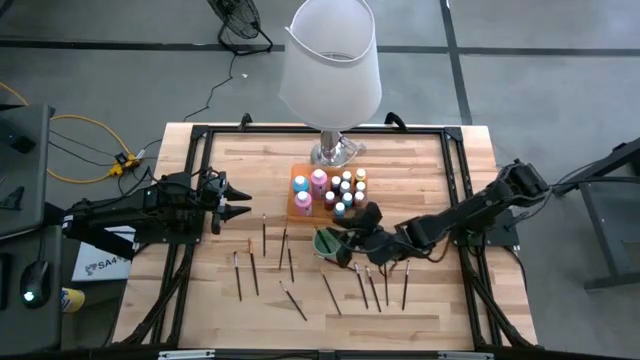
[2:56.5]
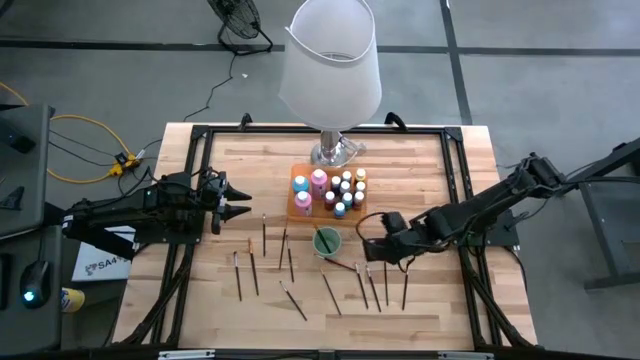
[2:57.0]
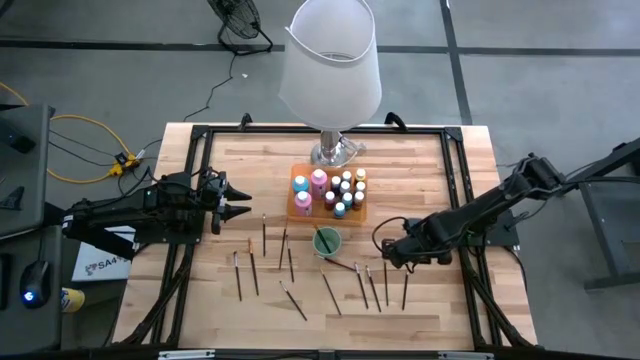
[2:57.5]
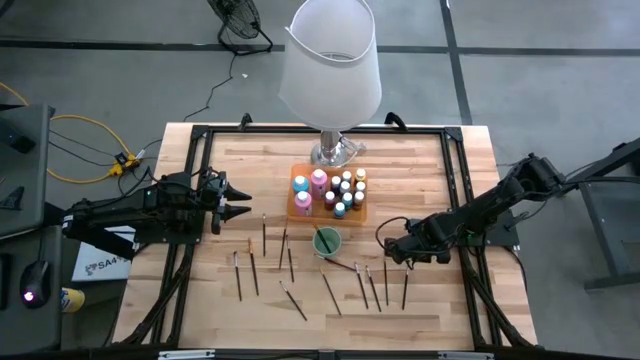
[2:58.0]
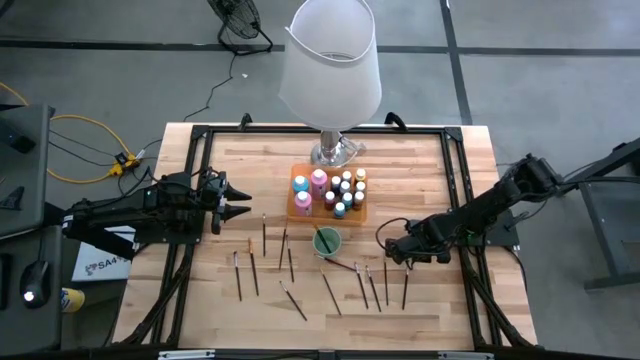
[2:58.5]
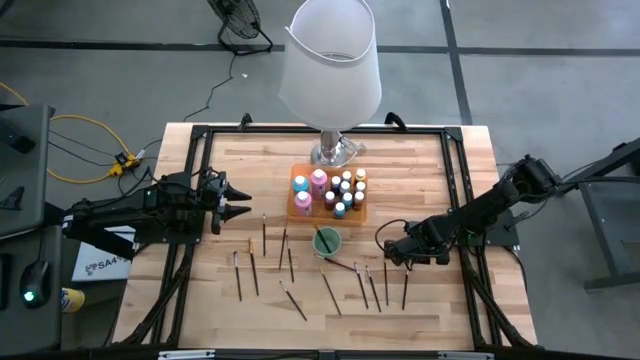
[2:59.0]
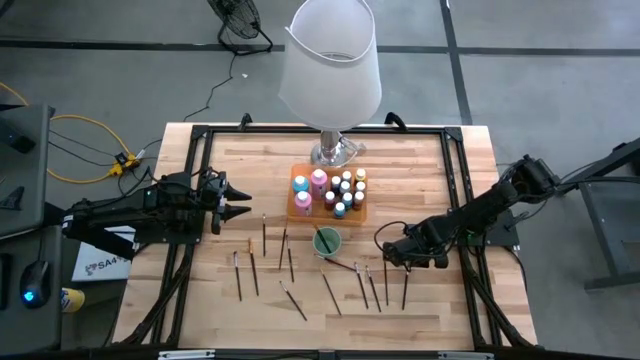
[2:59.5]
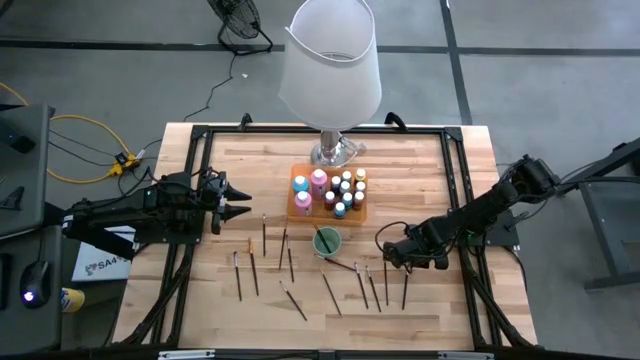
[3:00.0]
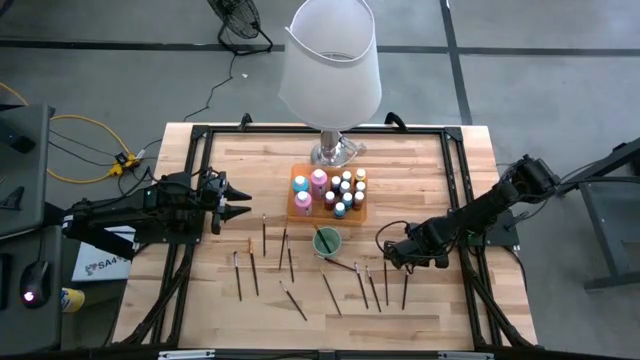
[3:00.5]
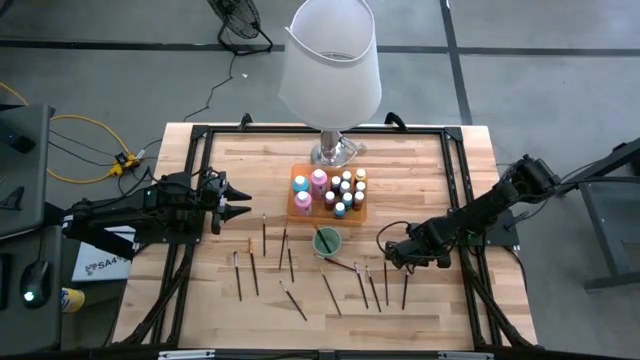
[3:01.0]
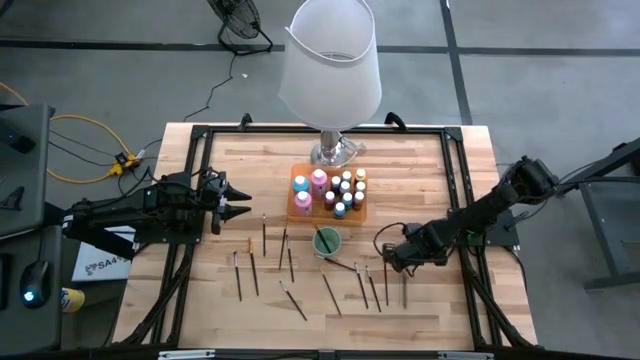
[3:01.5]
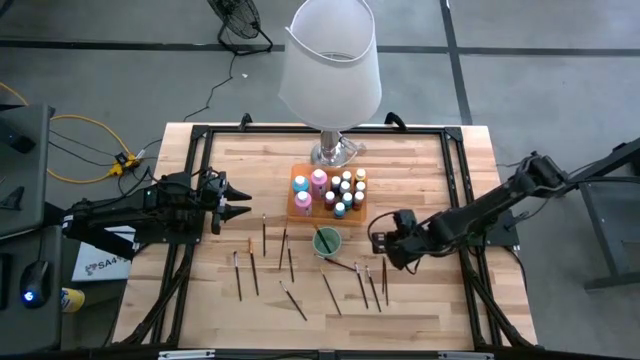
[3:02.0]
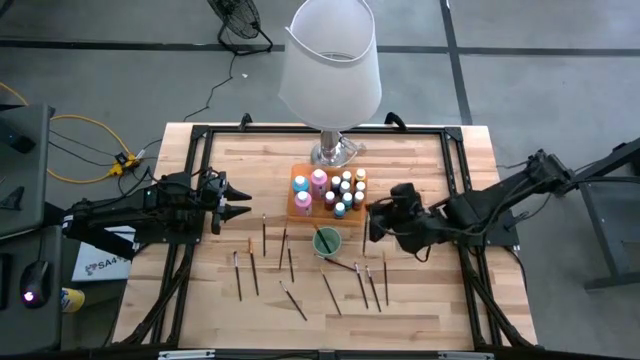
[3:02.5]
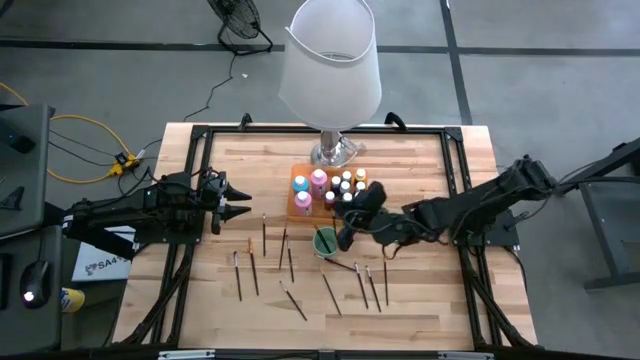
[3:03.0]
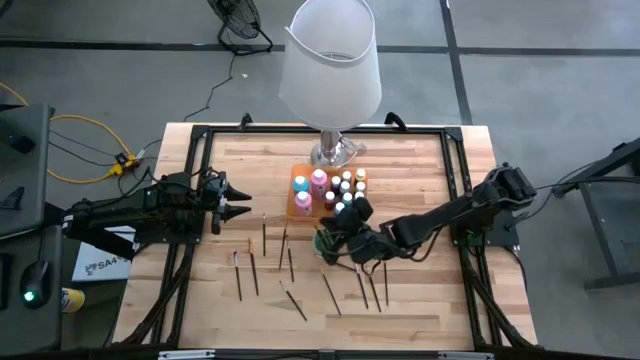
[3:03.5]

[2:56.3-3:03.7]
Task: Pick & Place Paint Supplies
Put the gray paintbrushes into the green cup

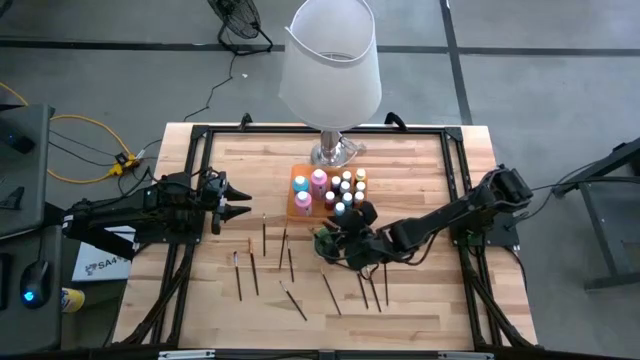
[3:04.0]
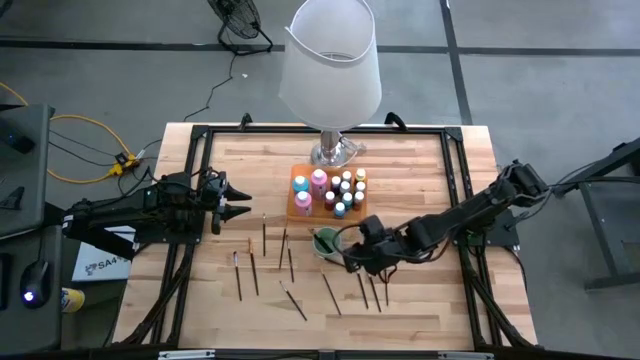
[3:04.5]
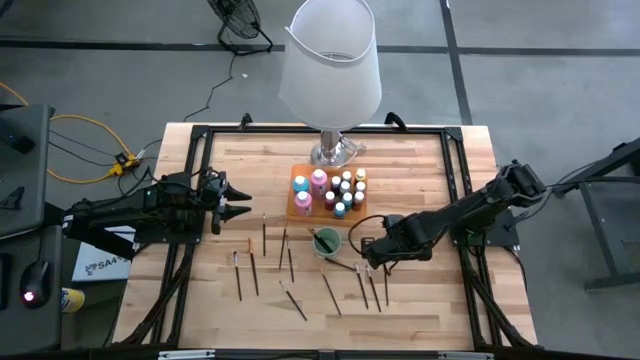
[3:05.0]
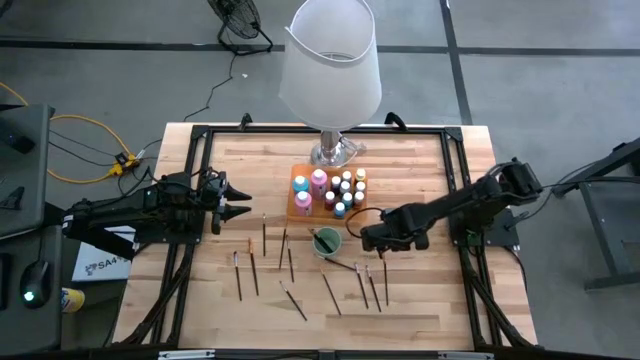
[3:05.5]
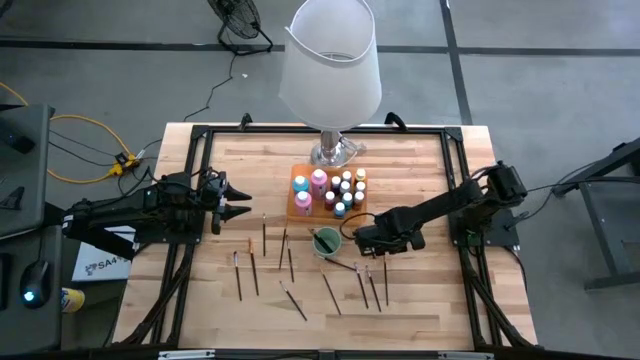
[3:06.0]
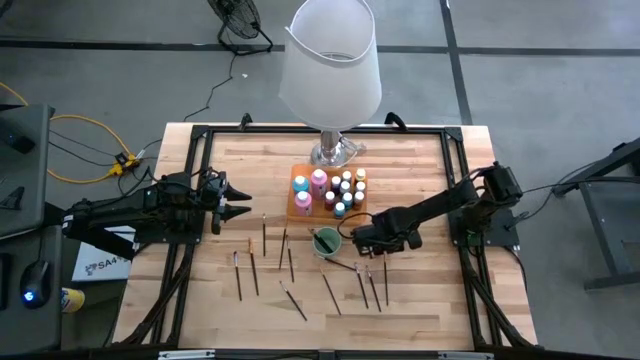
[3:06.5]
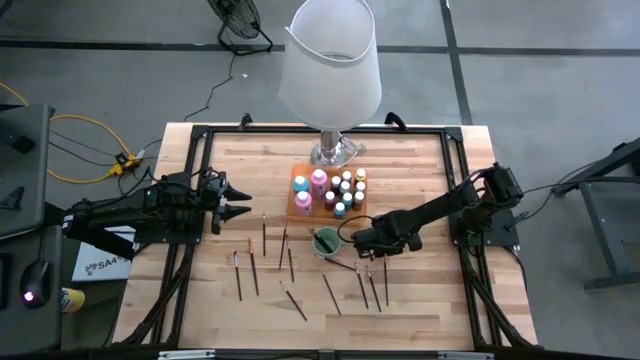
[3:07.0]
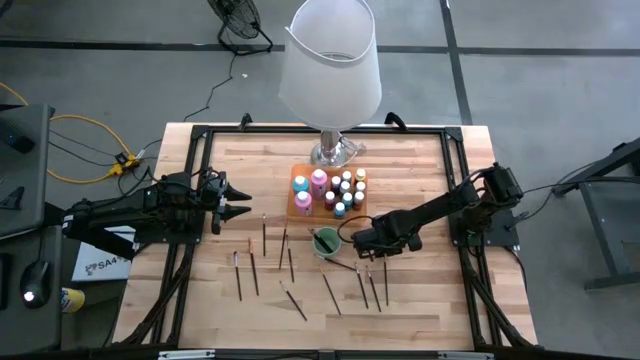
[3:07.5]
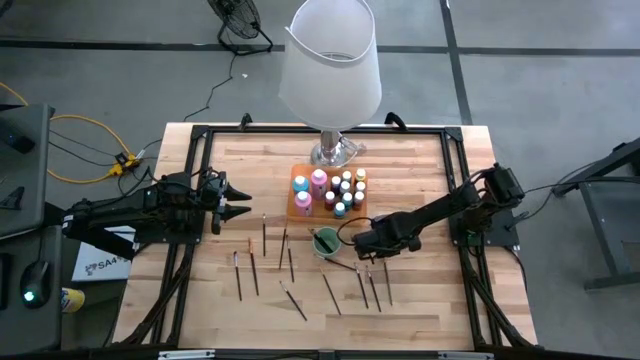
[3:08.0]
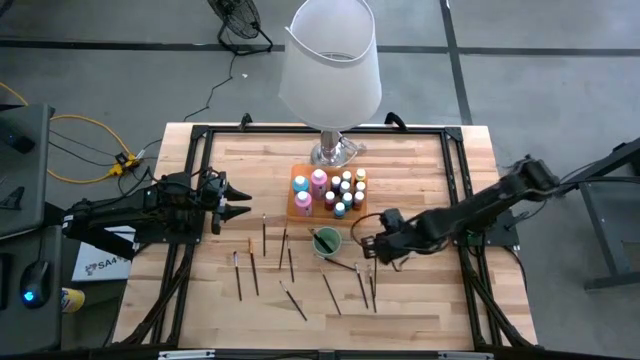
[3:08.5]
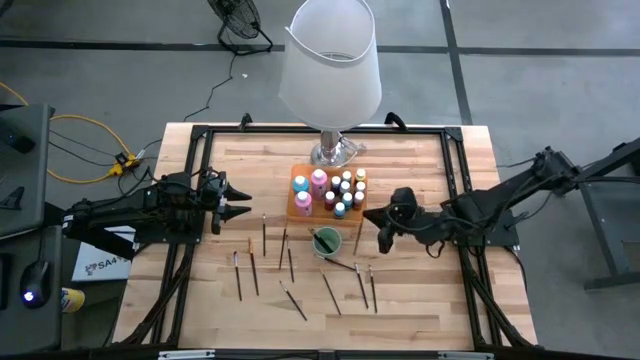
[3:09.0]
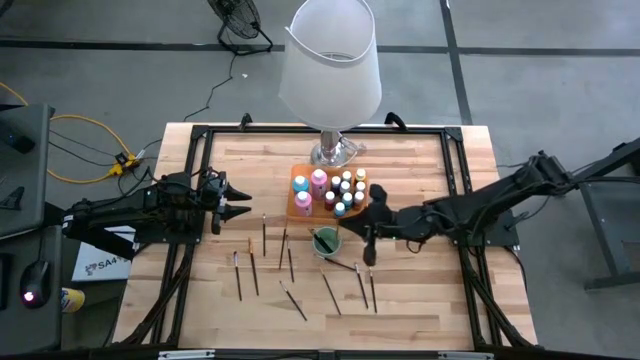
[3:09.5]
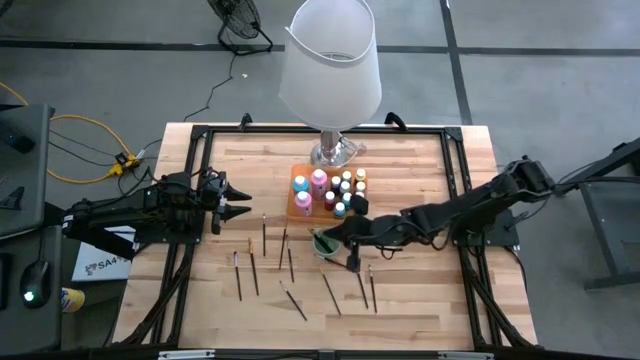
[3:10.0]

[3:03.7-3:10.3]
Put the orange paintbrushes into the green cup

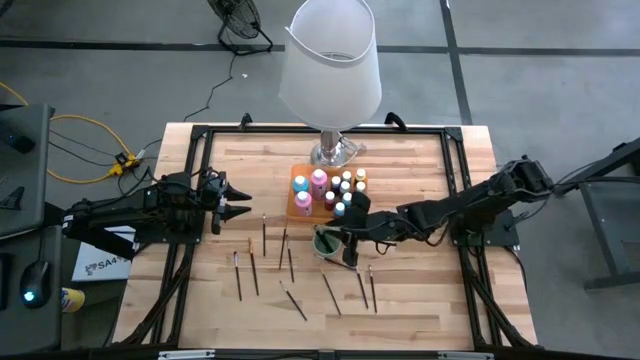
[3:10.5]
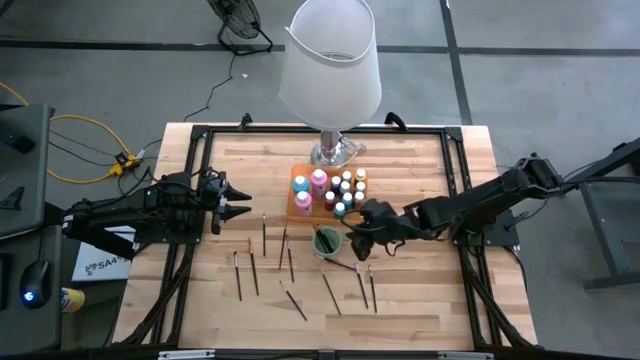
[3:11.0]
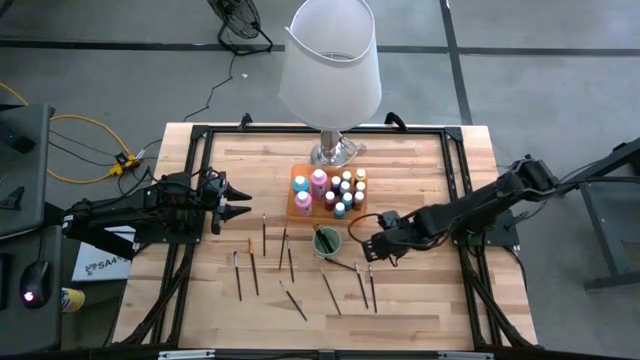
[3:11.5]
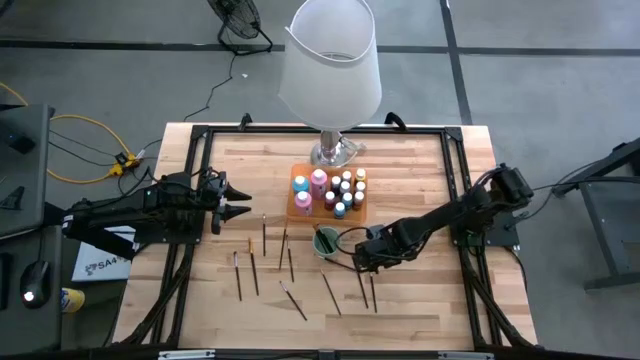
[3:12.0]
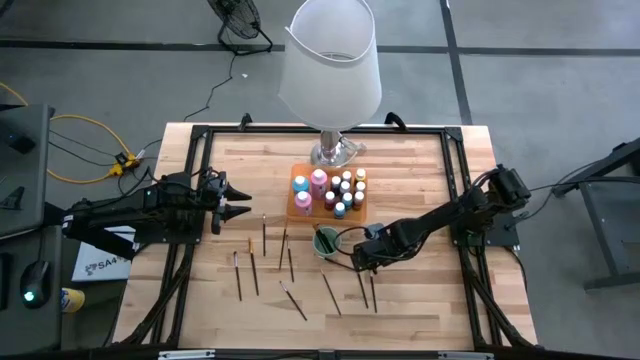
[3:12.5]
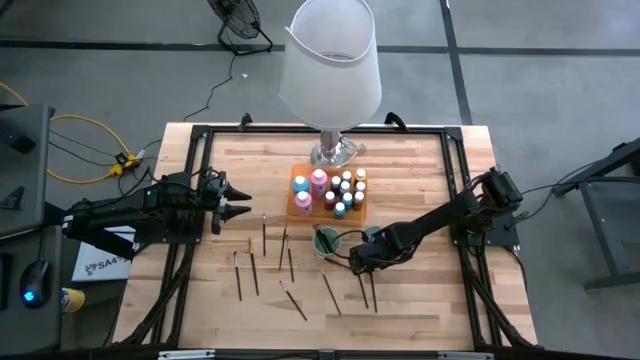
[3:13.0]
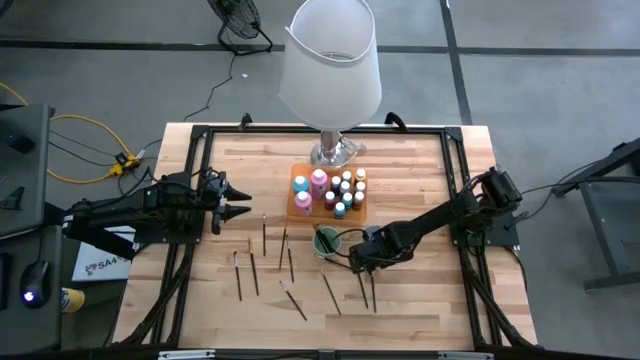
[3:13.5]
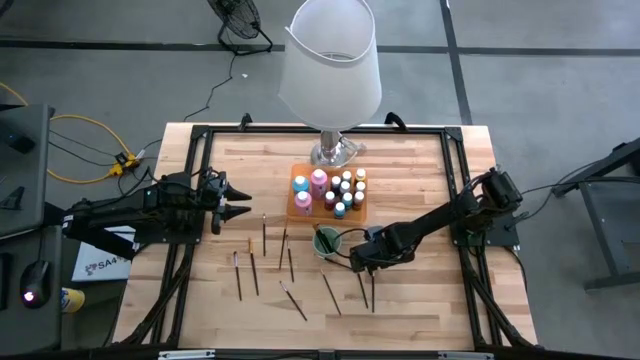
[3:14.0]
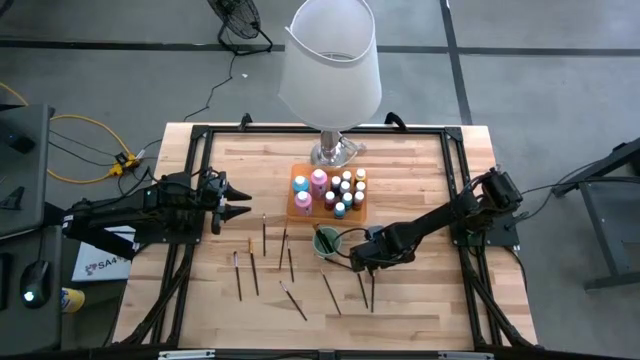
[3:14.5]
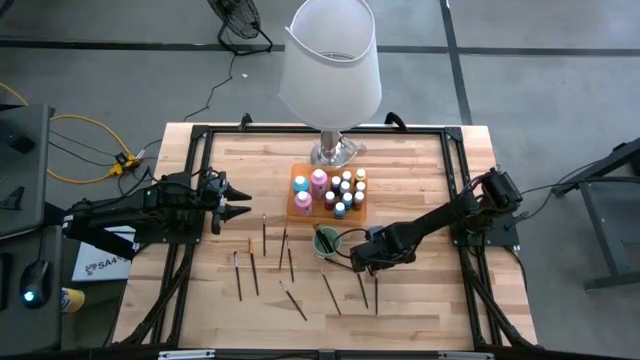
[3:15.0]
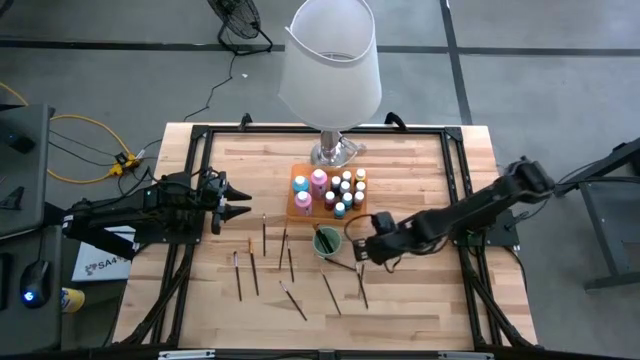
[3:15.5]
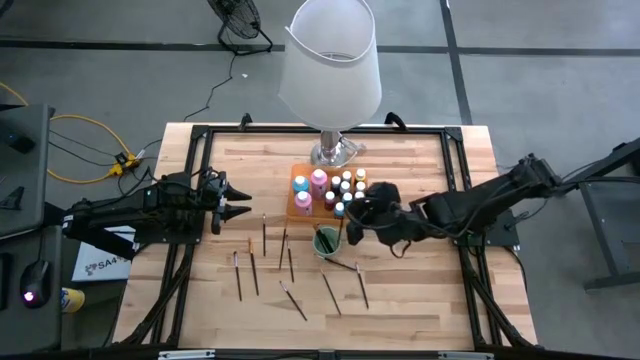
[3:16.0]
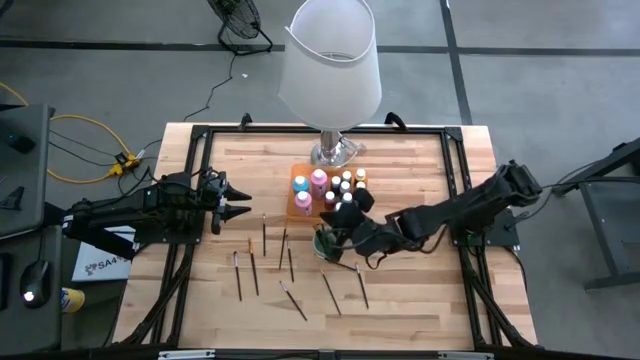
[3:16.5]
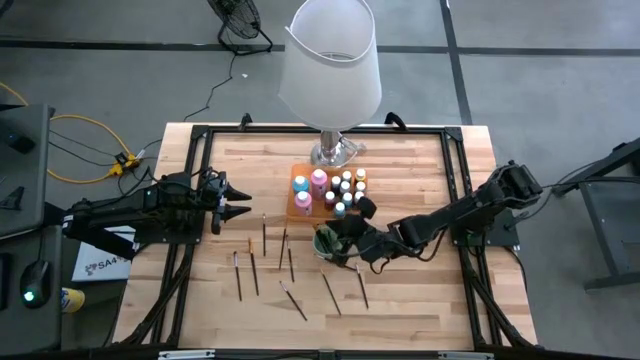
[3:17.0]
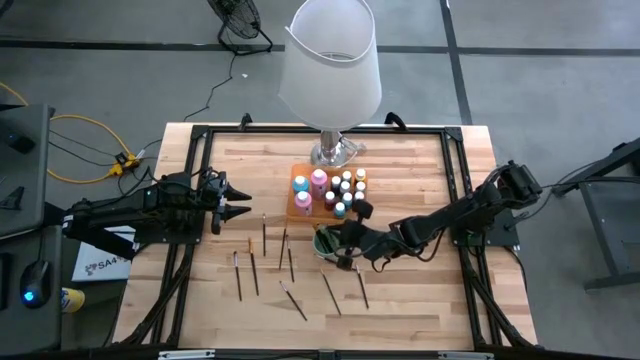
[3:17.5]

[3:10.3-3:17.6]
Put the gray paintbrushes into the green cup
